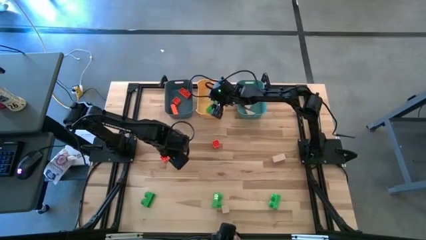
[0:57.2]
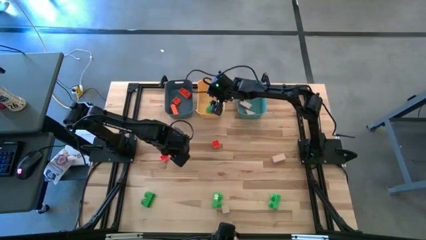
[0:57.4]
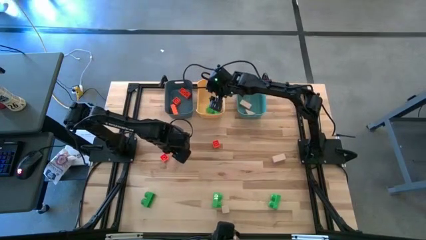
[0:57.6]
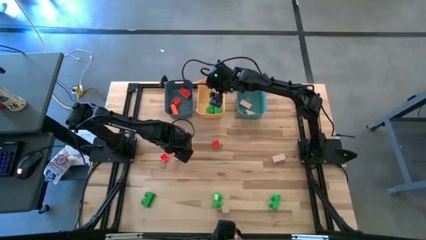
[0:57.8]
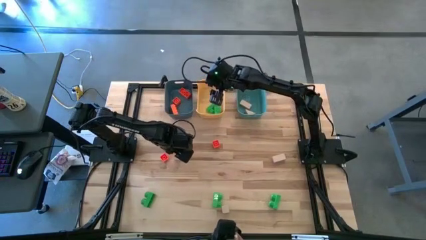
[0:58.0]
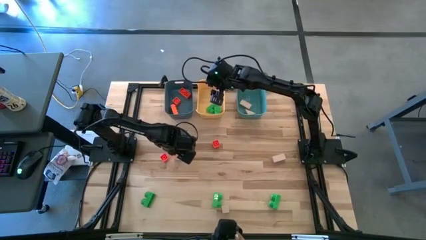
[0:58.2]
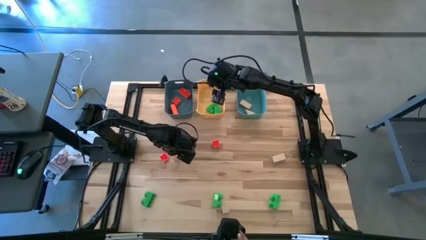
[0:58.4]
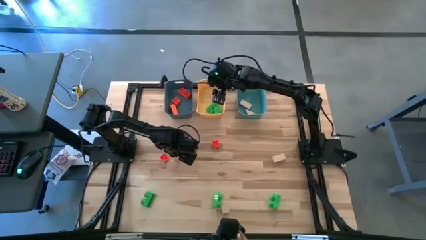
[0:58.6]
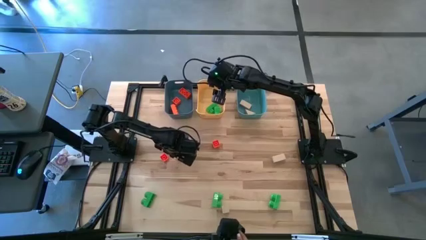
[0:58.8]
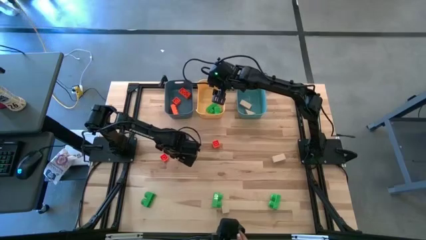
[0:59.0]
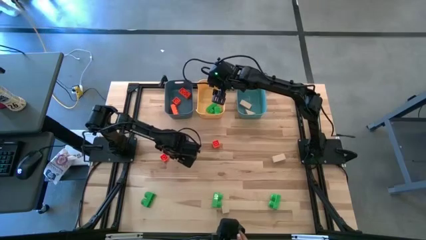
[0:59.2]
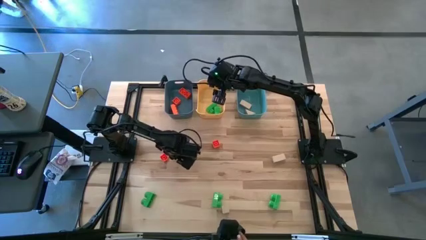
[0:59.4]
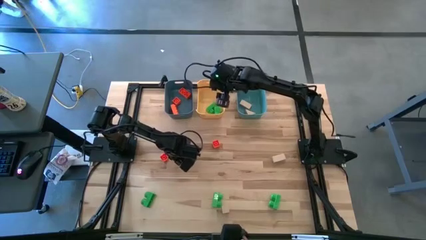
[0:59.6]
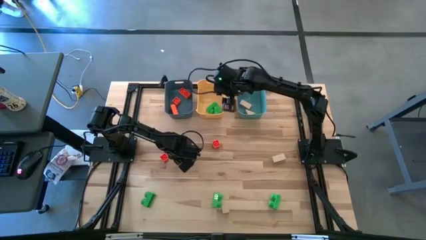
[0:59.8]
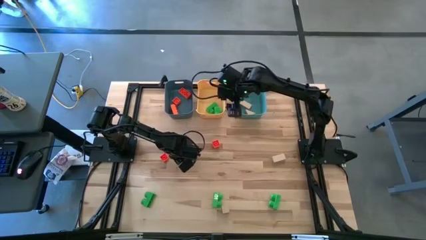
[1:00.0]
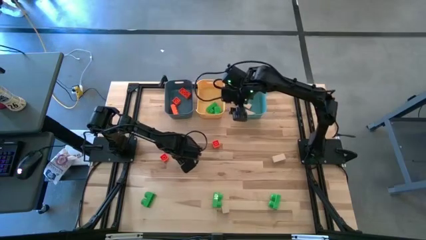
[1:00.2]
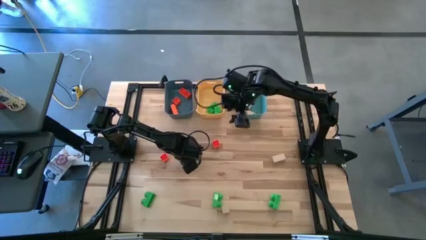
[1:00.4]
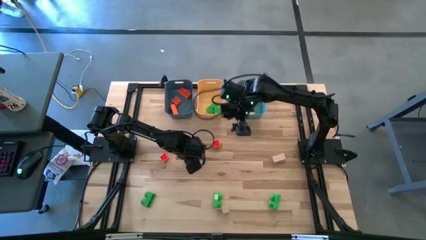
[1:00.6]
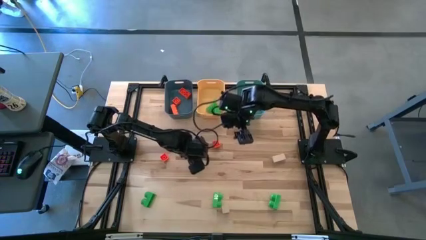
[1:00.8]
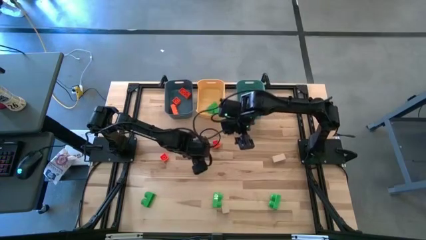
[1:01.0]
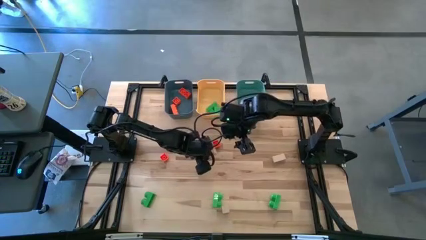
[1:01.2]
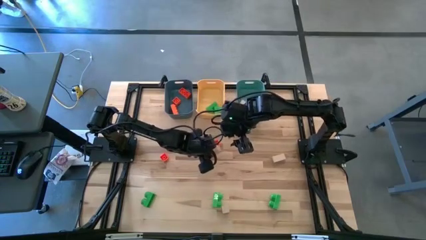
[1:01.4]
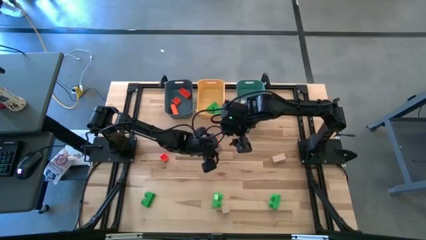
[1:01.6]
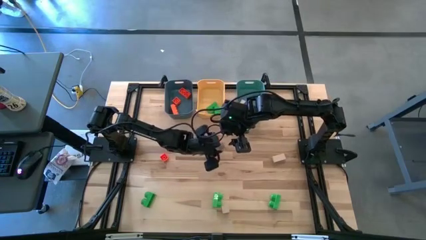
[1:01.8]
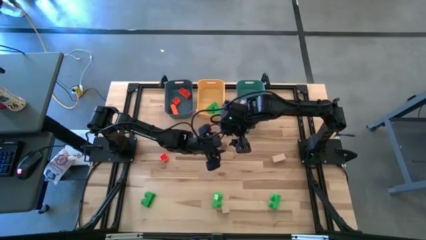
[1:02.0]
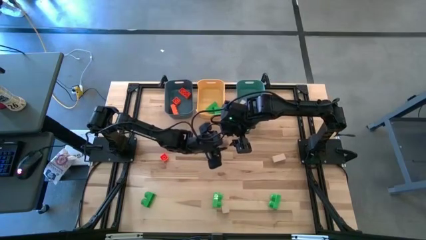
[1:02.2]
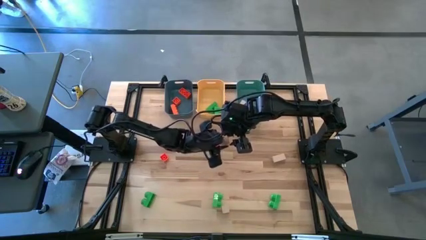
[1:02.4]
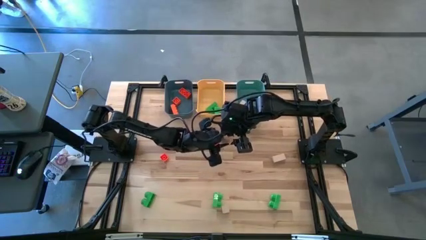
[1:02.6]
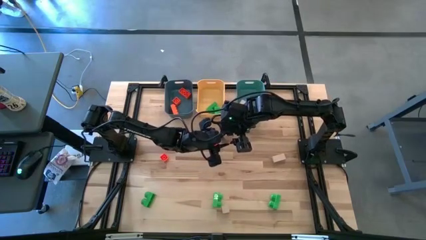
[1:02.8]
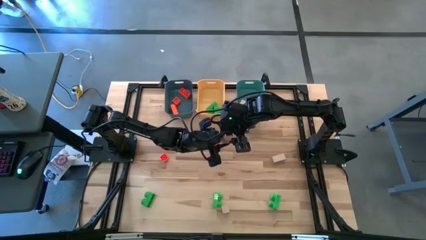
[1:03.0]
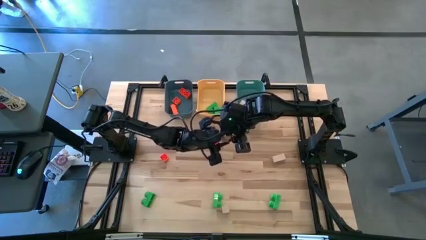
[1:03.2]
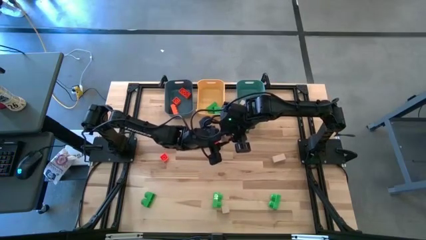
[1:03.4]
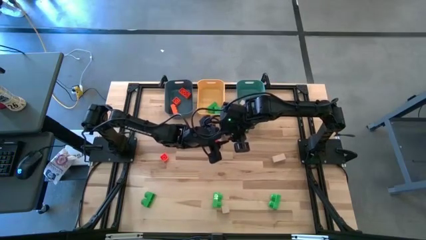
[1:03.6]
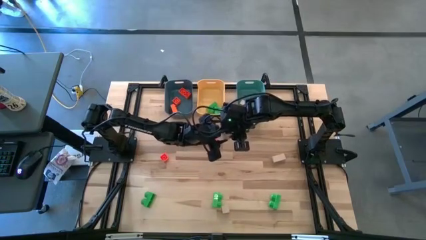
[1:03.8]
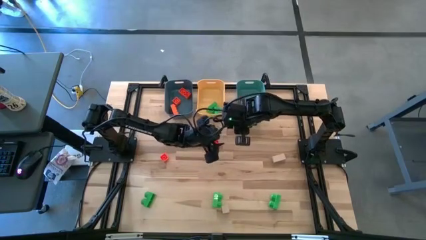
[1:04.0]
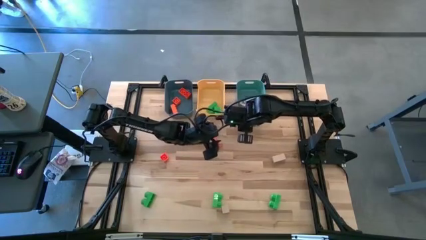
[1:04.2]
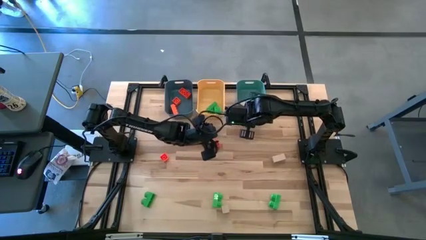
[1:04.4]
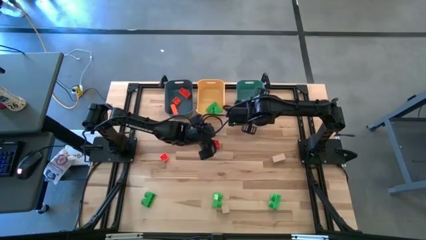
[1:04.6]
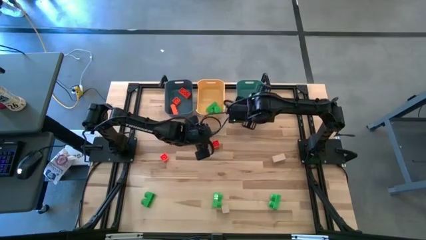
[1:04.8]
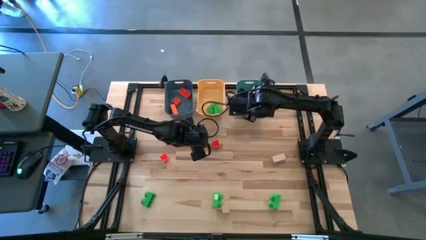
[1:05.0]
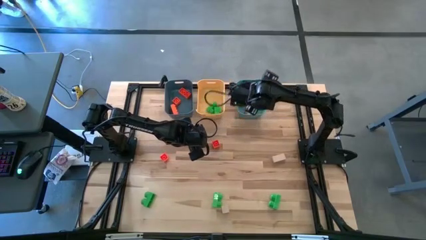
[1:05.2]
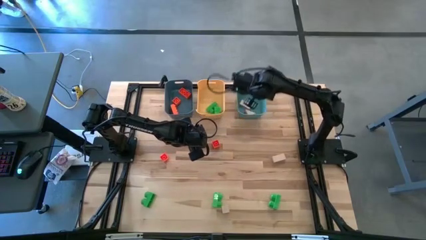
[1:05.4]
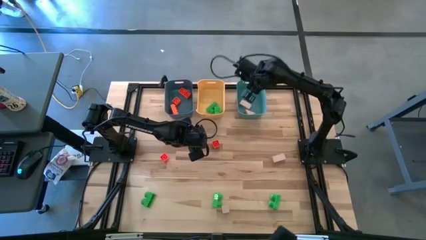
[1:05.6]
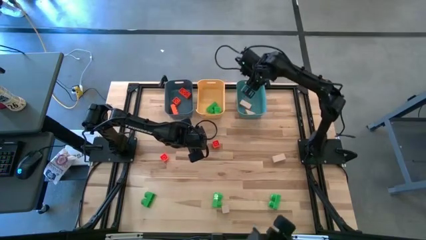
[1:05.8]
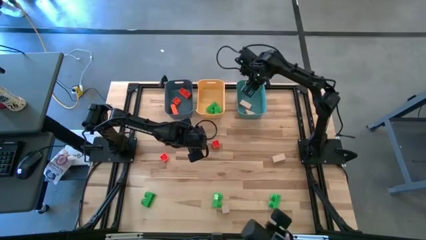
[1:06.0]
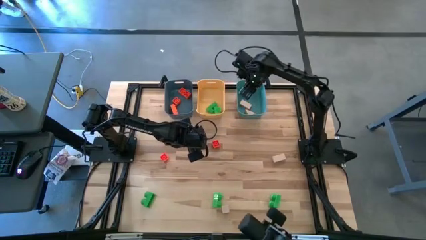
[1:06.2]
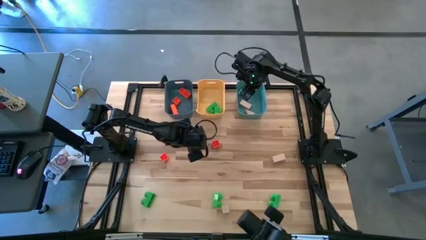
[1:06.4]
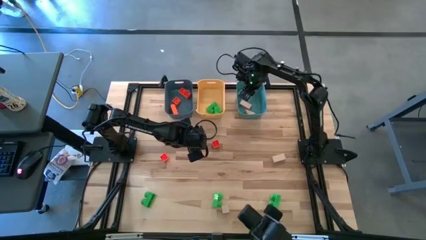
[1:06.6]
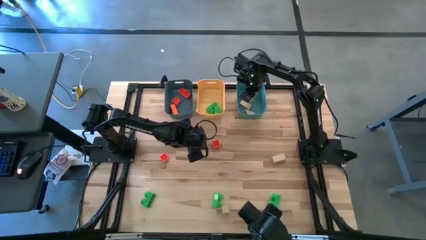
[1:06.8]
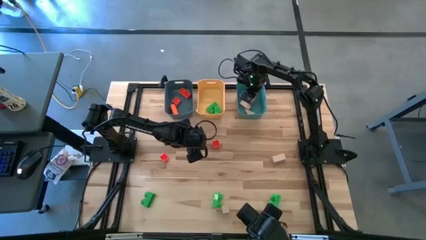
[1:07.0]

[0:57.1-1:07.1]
Task: Sort & place blocks by color
Put the brown block into the green bin
